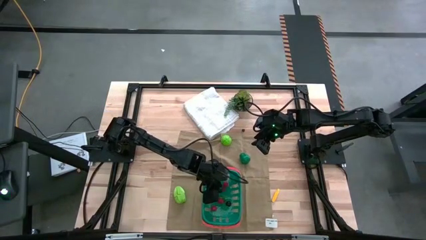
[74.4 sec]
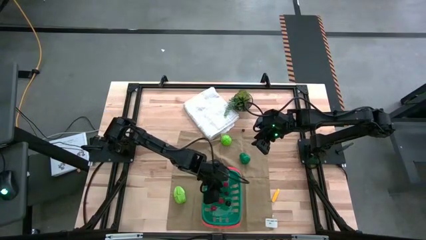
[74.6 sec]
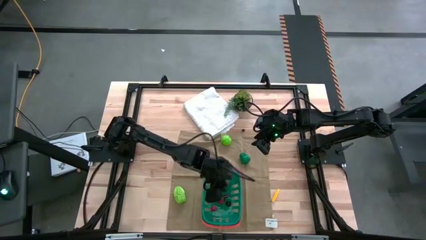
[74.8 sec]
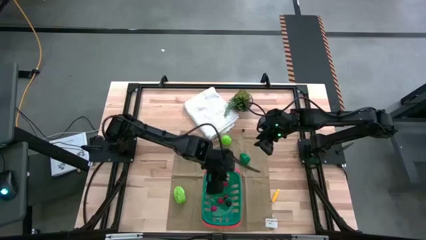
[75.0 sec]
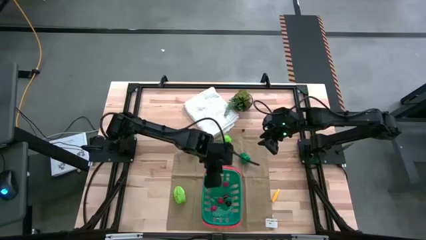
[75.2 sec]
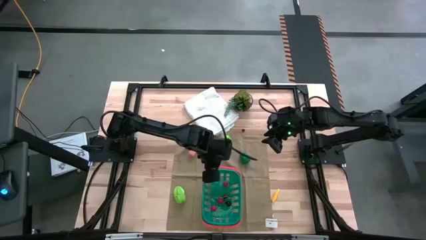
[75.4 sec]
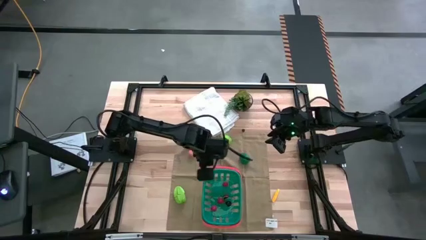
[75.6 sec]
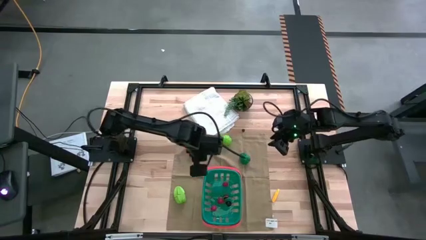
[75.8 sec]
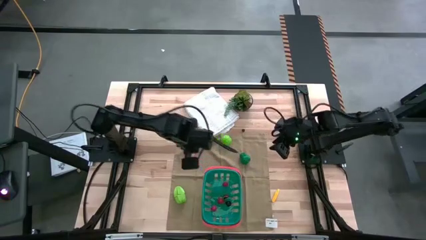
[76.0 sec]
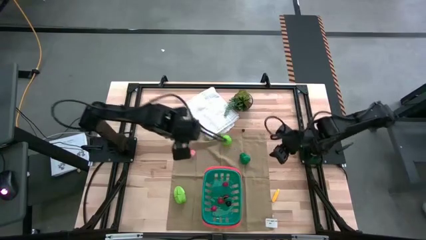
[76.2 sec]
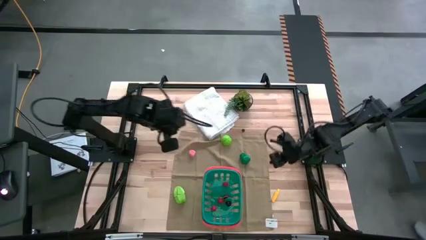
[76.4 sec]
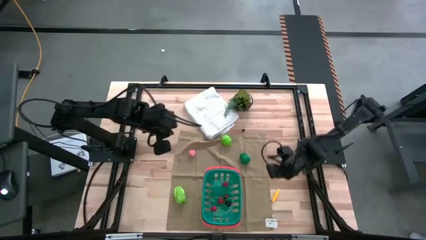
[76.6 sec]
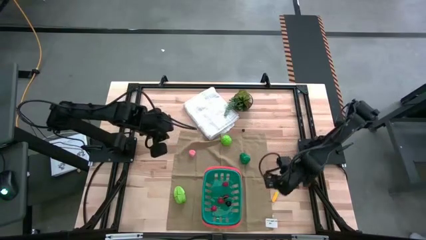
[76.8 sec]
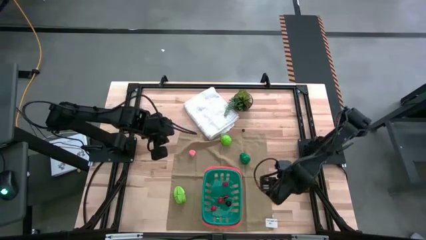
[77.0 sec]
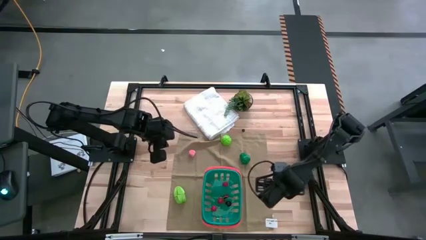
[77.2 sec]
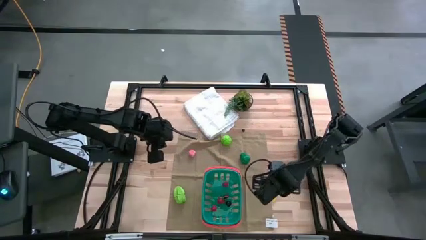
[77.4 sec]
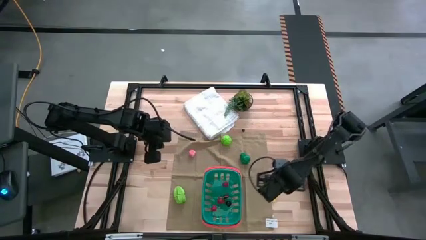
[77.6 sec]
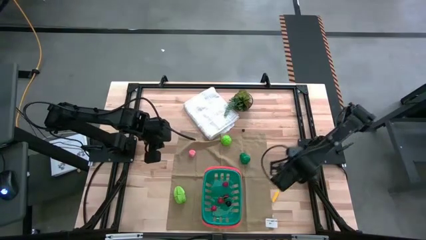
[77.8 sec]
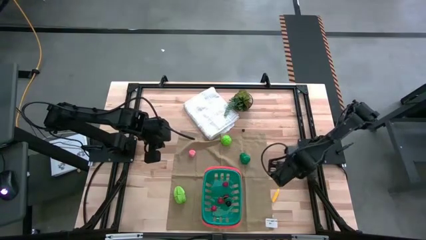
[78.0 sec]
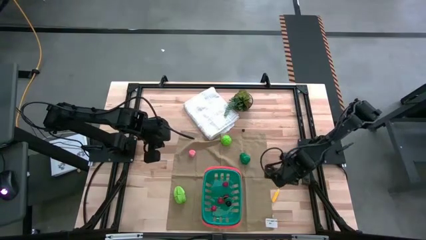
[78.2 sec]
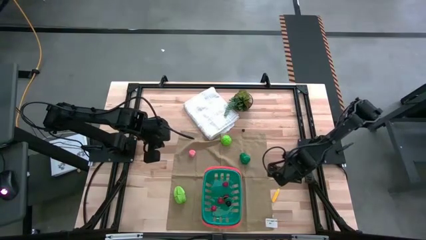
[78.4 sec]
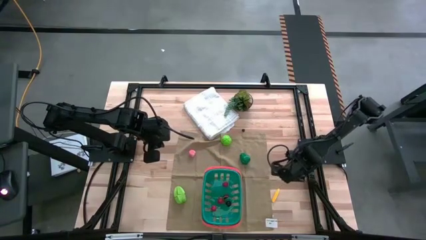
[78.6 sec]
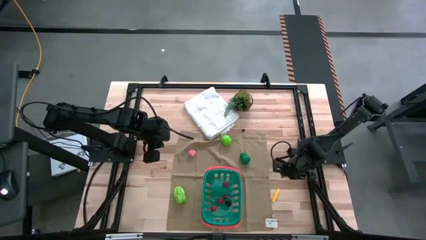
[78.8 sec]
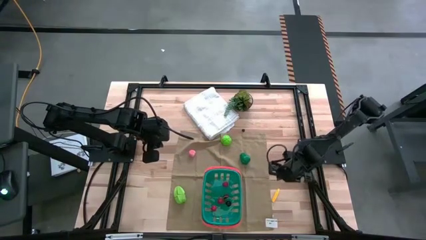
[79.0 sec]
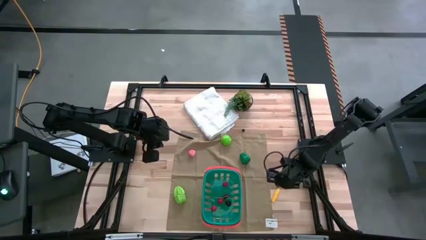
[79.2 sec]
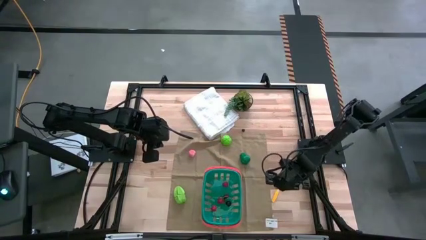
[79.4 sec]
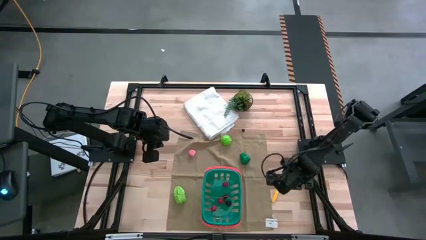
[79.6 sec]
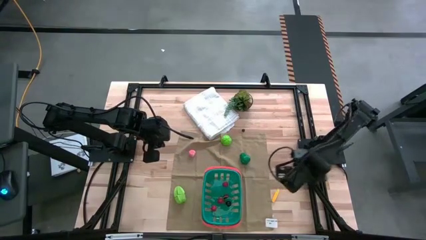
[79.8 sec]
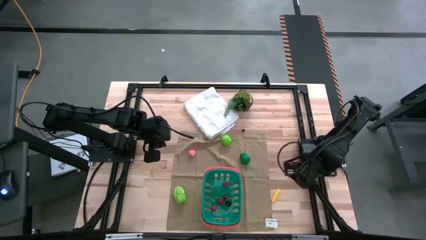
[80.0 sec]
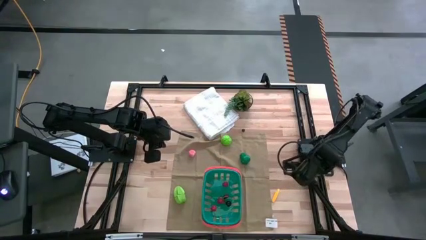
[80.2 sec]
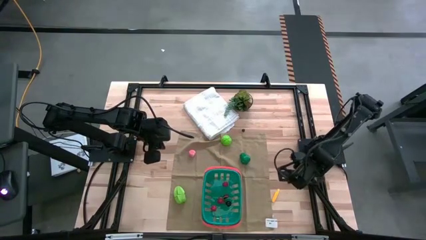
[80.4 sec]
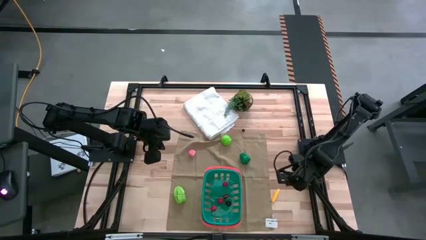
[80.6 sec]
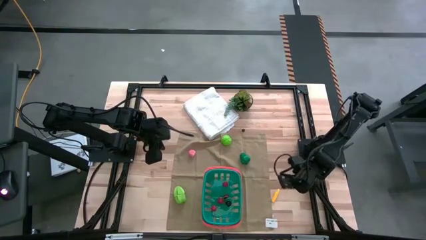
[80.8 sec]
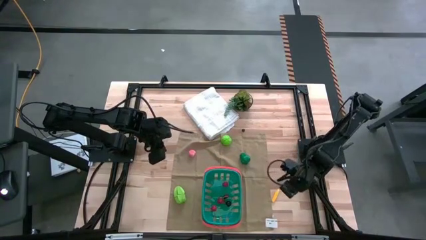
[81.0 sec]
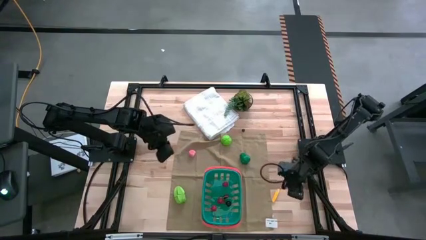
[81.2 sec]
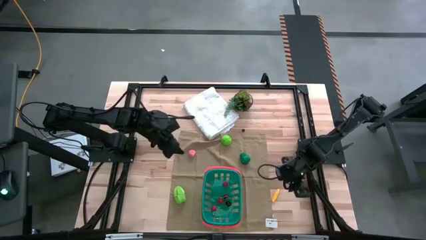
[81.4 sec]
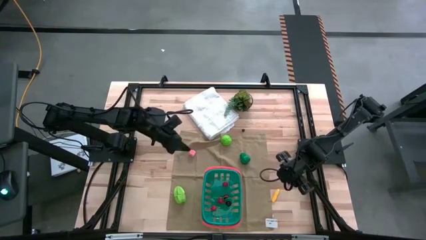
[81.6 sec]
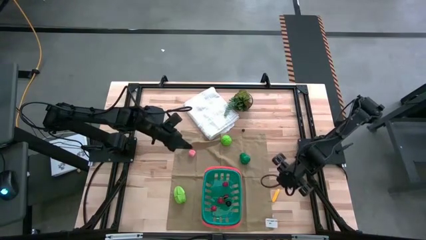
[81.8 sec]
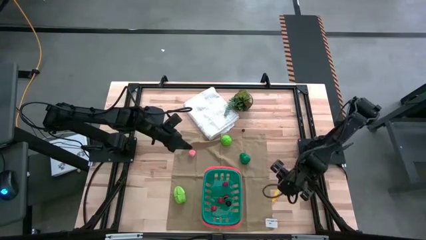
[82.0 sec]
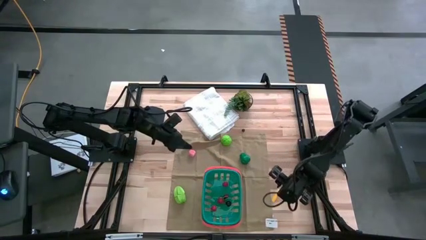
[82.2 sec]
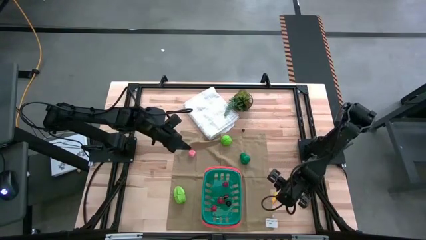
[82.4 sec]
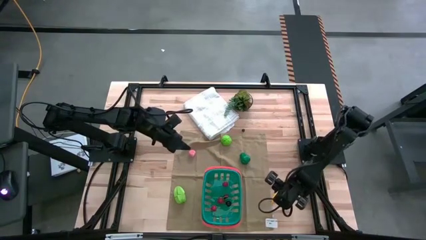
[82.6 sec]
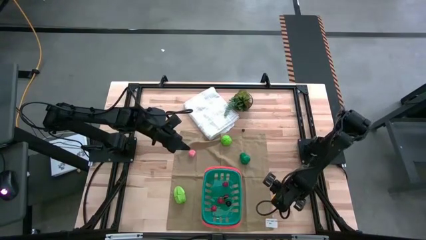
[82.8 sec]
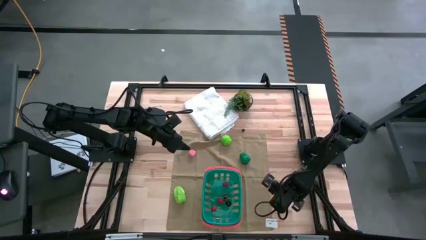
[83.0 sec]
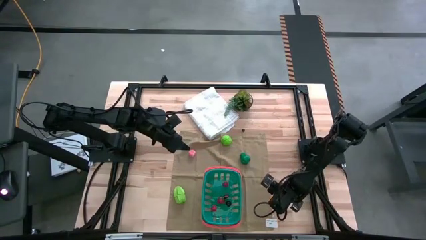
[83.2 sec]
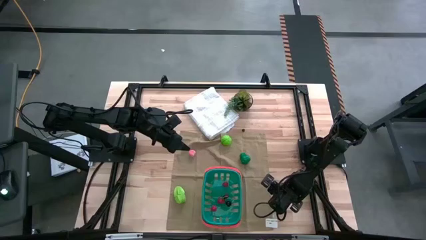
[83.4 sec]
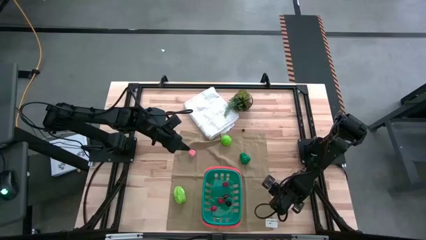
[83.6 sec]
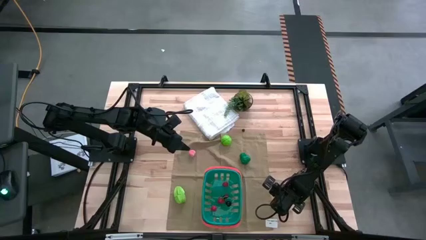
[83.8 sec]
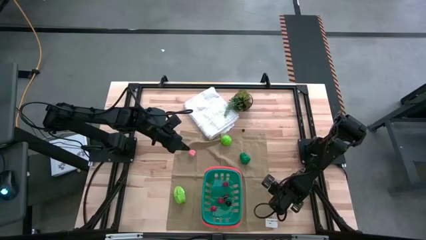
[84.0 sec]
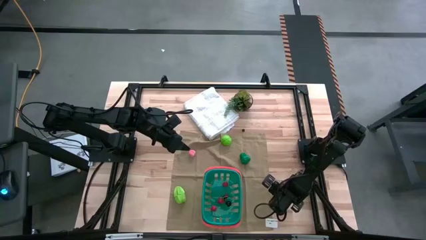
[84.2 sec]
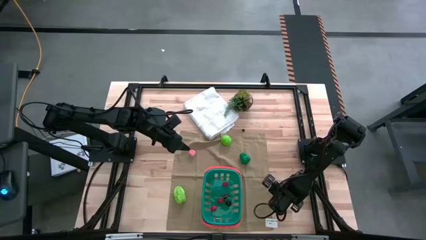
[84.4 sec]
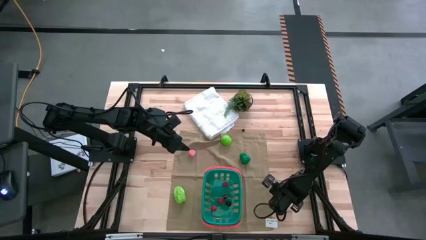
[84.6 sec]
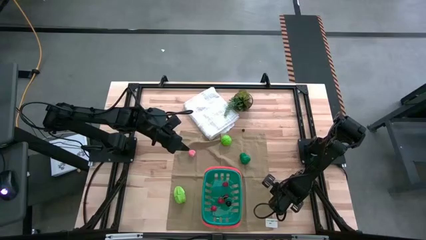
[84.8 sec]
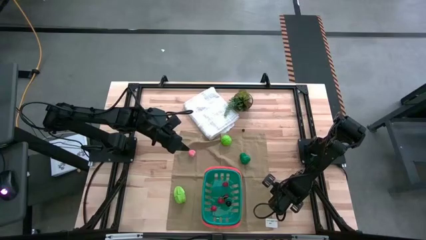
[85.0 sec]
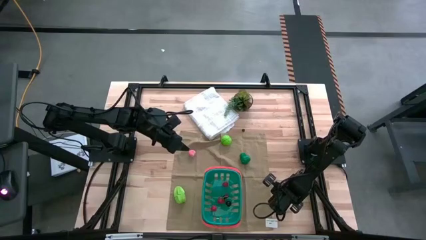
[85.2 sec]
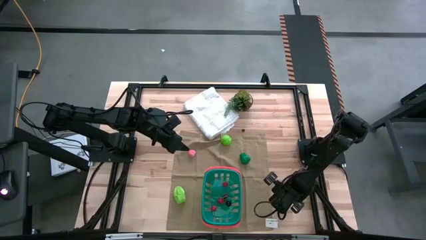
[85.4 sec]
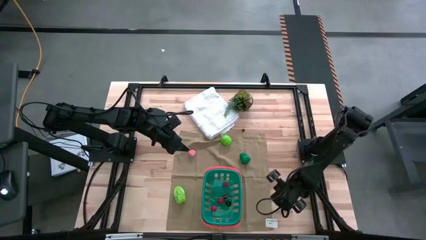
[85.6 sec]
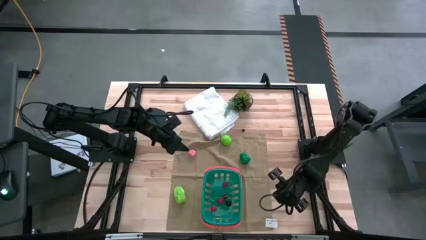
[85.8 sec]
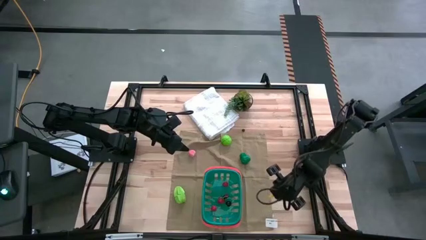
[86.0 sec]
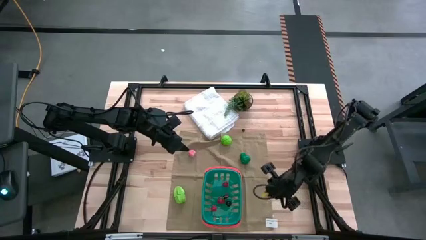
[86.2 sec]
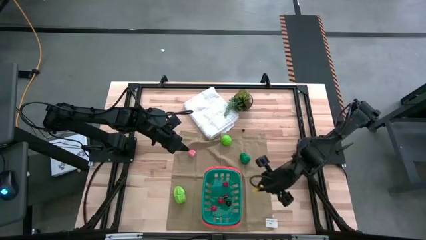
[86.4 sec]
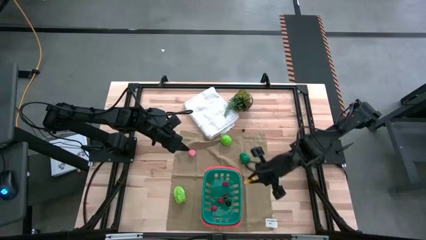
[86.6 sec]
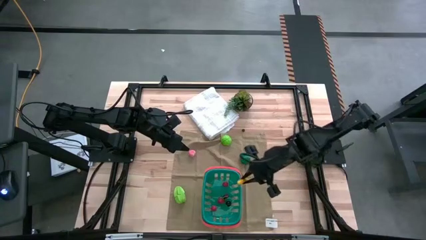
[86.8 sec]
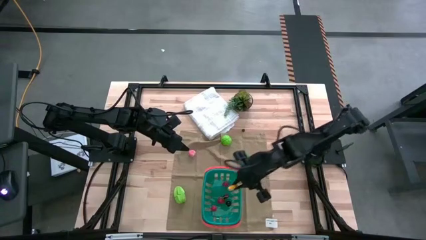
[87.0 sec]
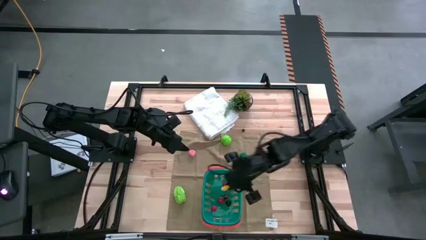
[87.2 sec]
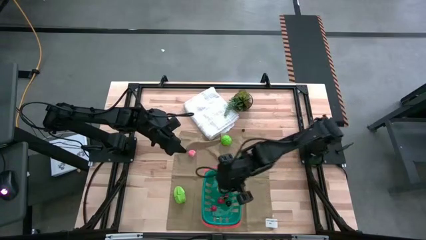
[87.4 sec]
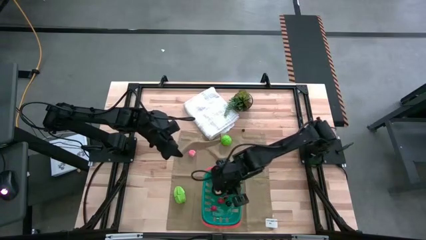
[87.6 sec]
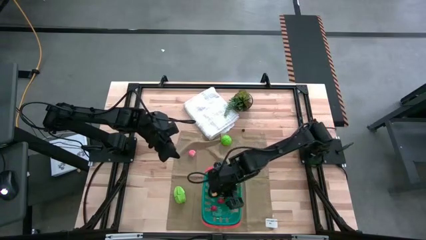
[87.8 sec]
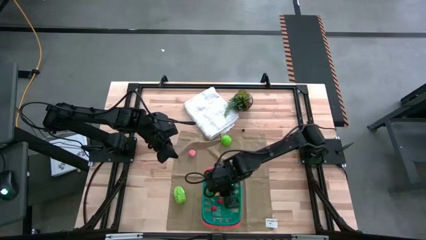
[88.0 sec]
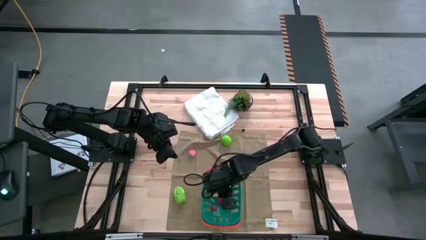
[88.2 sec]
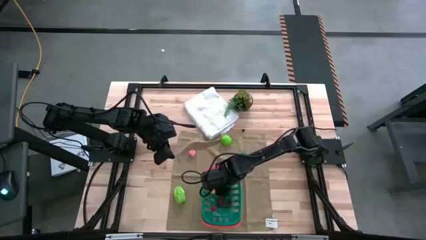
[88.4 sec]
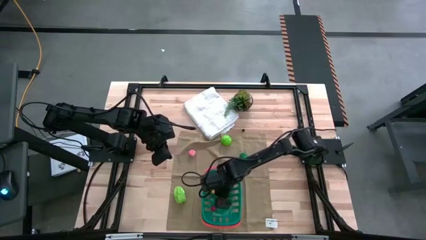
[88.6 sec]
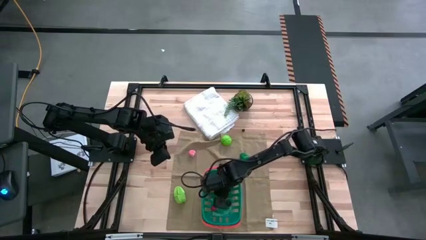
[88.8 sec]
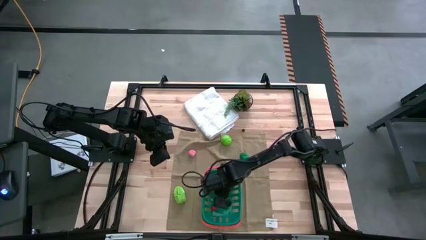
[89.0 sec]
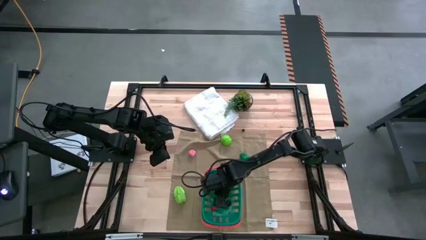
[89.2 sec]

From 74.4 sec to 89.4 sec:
Task: Pick and placing Produce into tupperware
Put the yellow corn into the blue bin

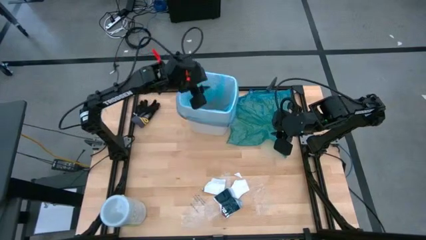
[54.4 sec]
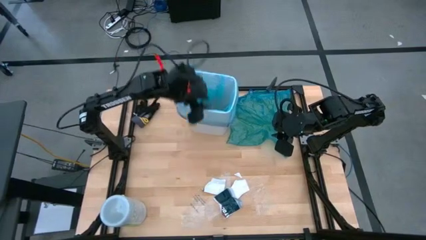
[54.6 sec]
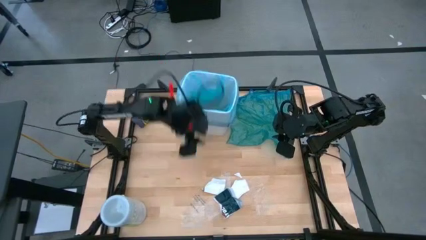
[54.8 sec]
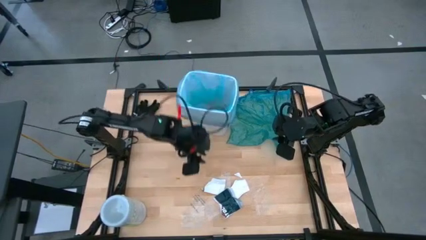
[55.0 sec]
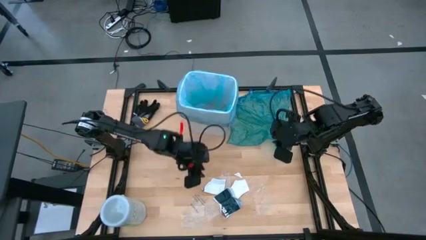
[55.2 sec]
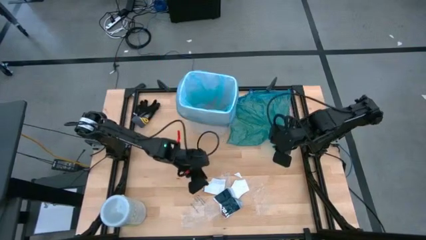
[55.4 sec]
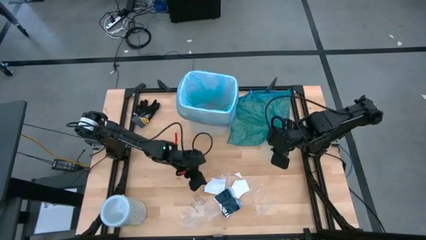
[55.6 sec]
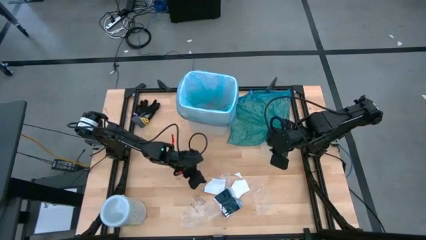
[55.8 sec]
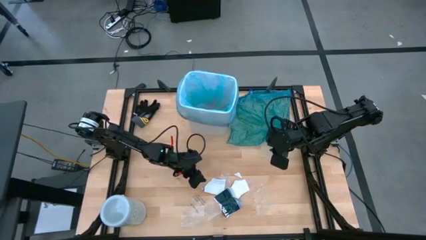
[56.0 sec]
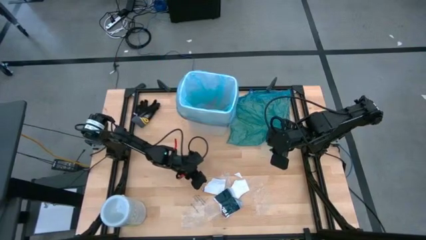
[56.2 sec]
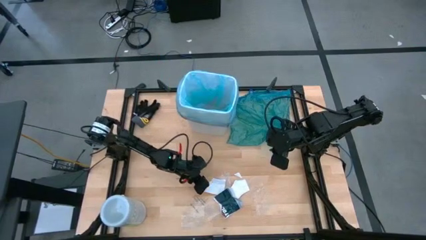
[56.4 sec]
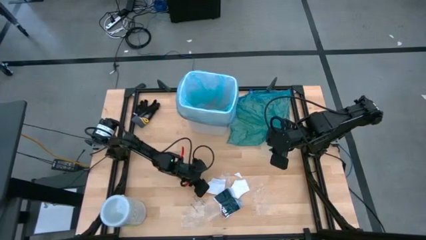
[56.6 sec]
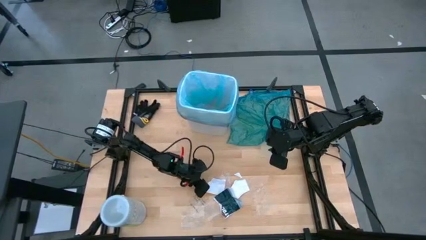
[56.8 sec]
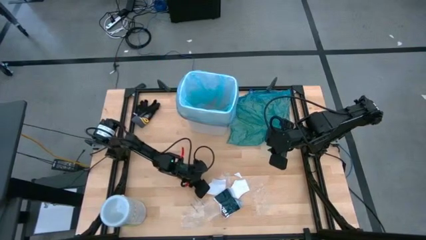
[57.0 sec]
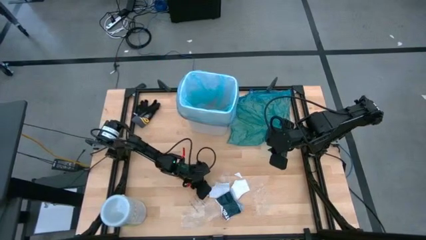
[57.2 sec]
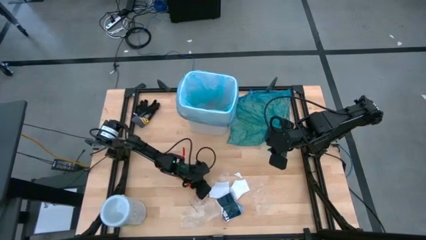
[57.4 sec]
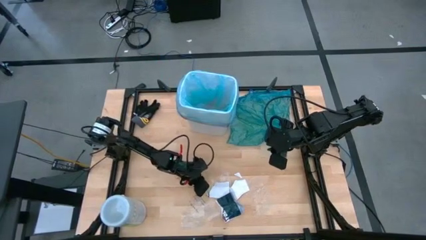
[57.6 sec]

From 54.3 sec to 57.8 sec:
Task: place trash/remove bag and relplace
Put the white magazine paper into the trash bin
